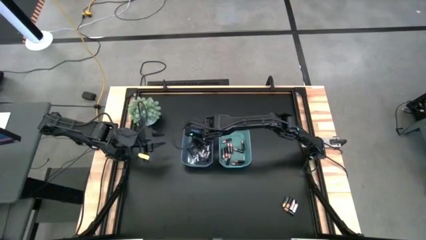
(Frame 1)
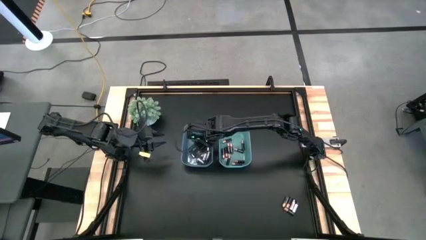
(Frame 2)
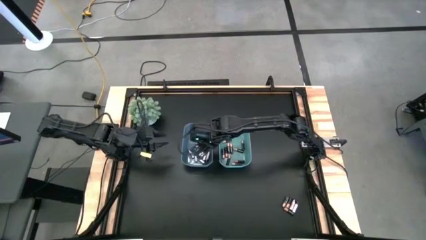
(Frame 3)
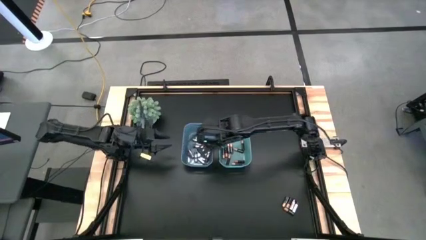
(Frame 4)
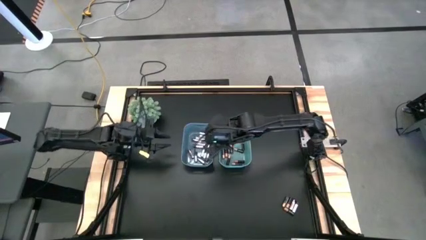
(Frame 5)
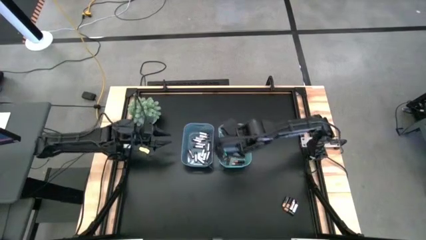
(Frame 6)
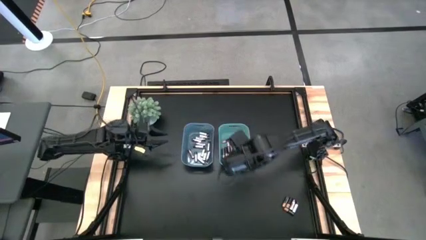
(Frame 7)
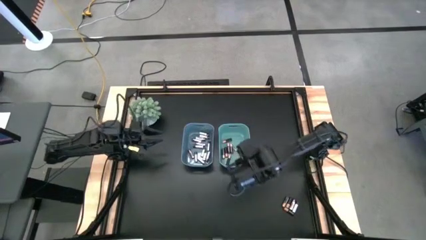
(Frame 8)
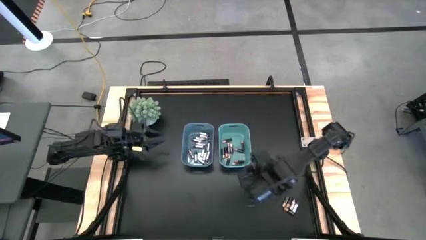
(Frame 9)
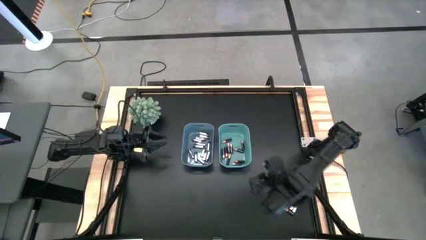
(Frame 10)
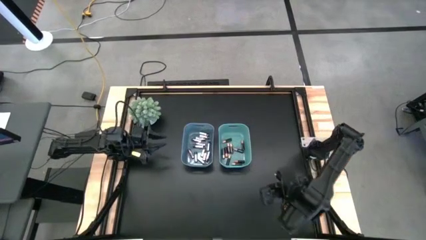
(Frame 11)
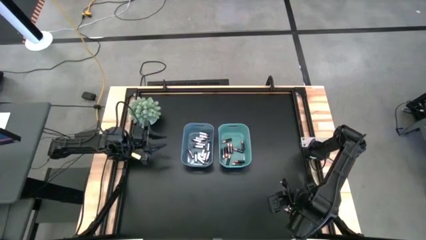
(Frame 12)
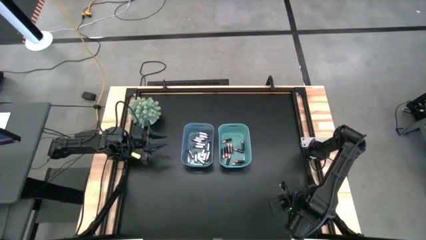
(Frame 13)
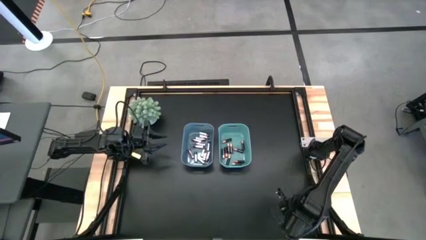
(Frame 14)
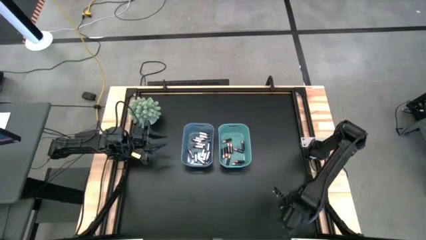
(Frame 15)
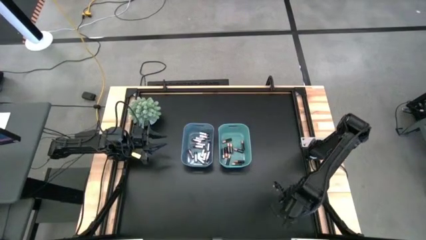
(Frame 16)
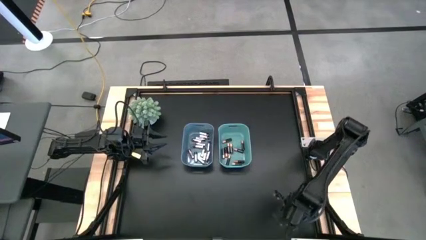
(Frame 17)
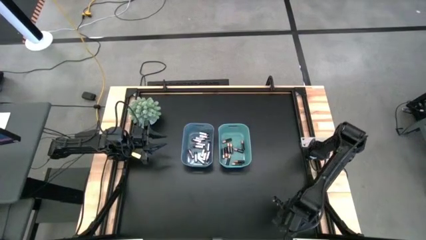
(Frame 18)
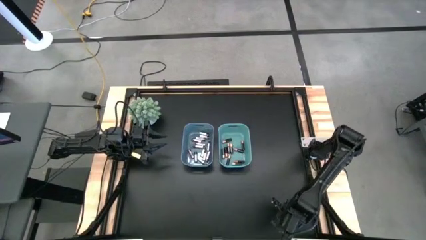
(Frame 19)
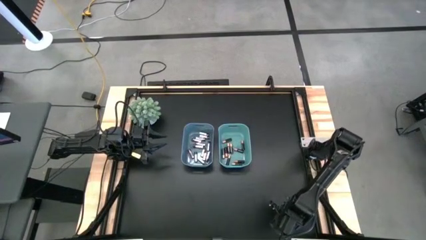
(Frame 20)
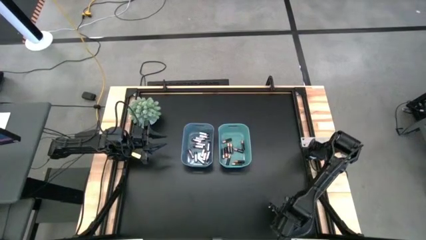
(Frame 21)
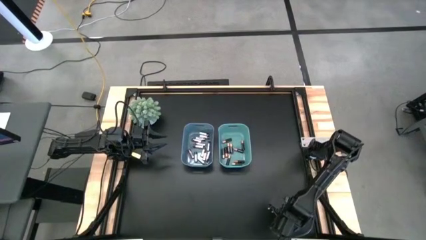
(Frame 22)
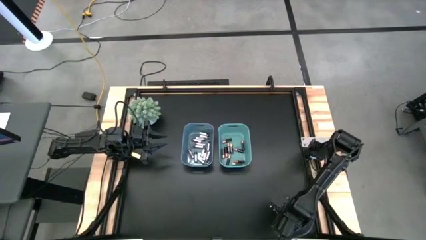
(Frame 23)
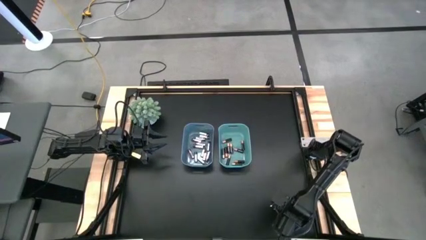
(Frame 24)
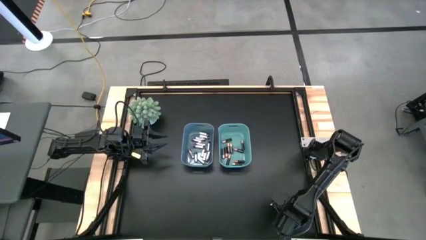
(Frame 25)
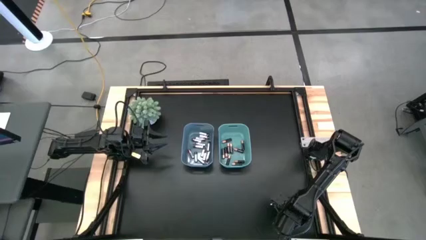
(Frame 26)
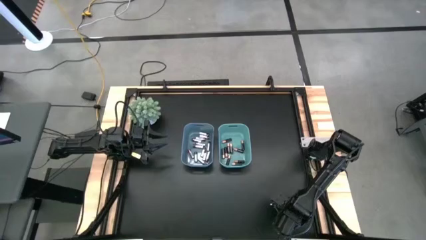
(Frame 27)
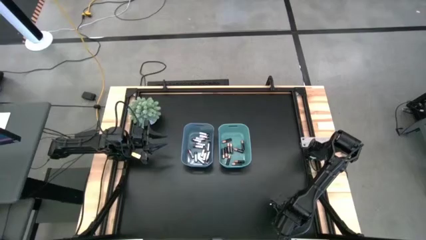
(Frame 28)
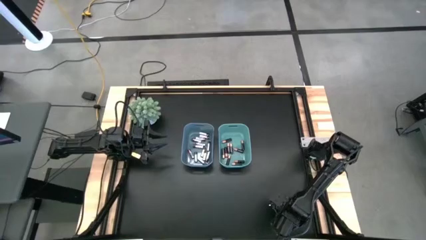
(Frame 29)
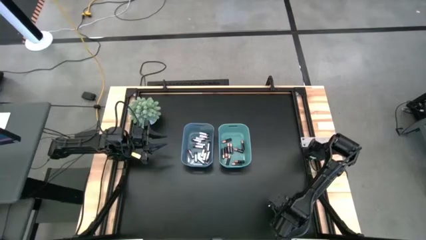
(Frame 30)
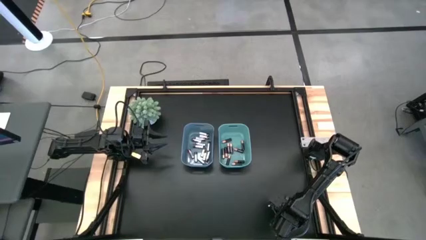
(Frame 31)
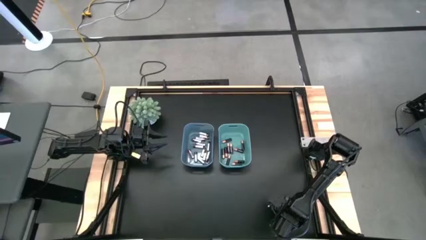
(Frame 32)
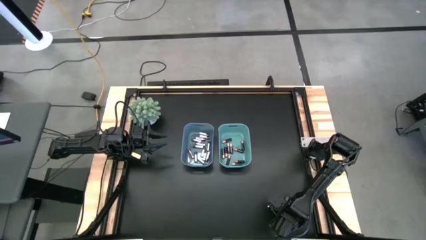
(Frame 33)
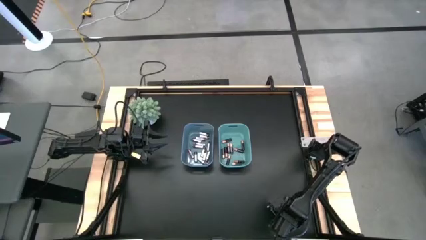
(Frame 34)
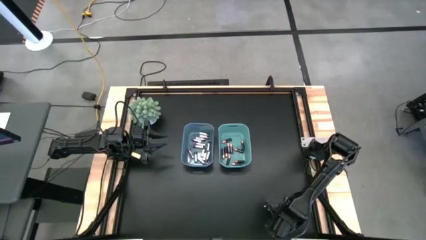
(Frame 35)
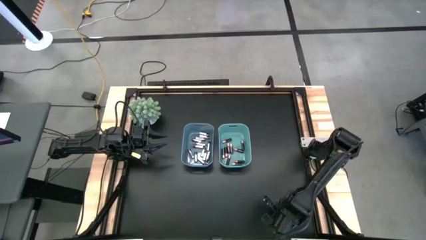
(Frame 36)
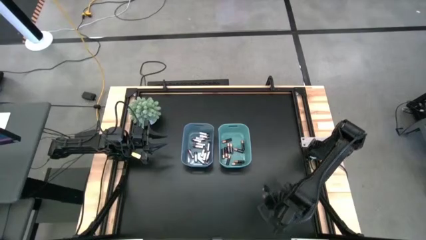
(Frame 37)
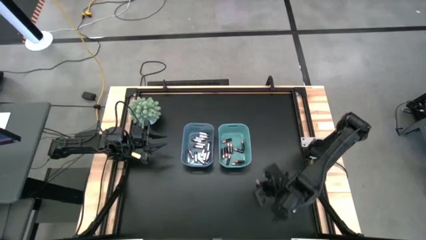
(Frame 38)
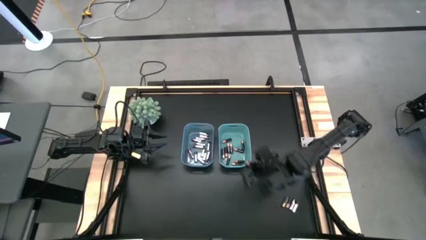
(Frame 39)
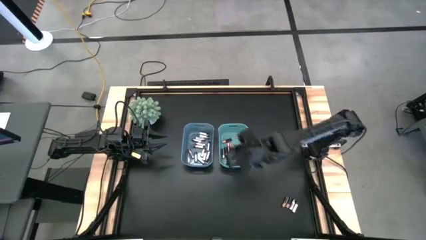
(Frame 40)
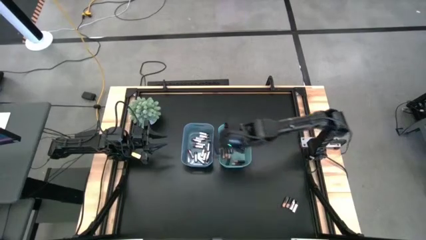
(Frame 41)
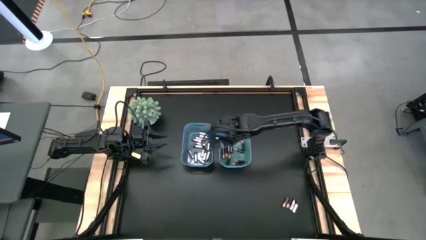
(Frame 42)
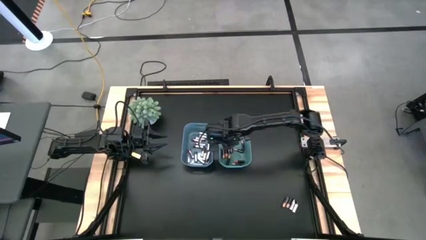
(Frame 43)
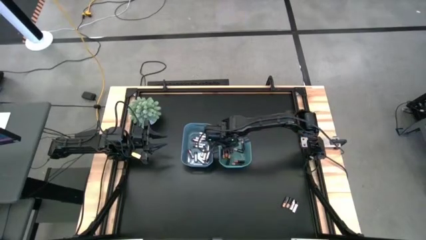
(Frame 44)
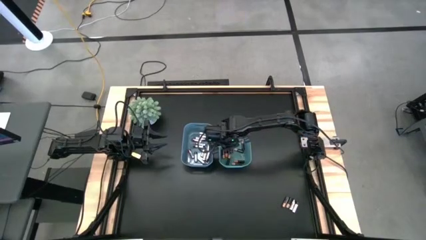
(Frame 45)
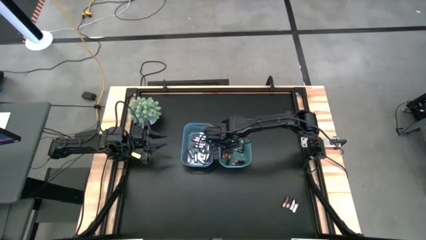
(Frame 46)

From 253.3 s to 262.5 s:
Task: Sort batteries
Put the black battery into the green bin

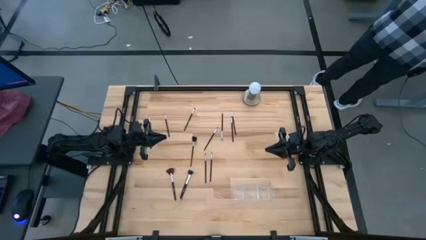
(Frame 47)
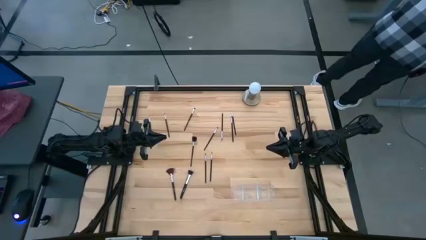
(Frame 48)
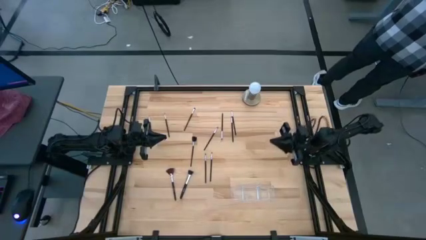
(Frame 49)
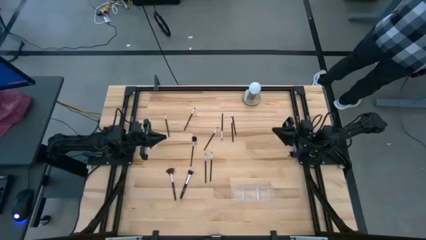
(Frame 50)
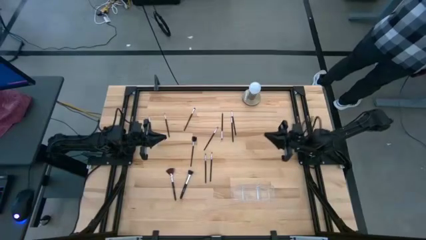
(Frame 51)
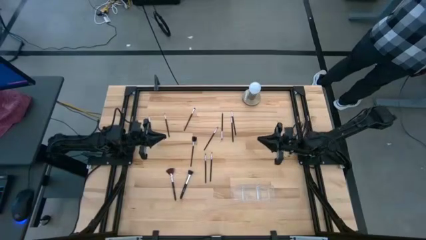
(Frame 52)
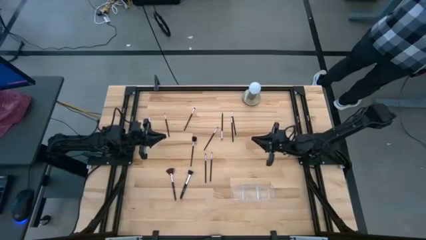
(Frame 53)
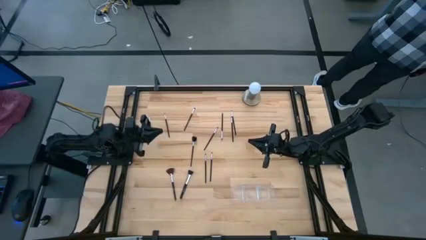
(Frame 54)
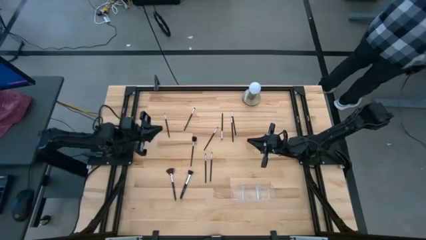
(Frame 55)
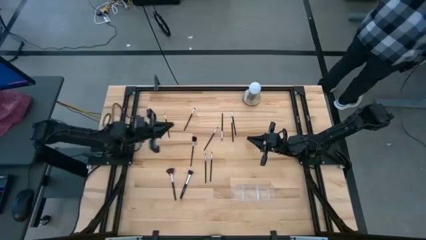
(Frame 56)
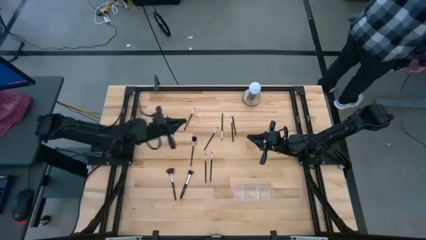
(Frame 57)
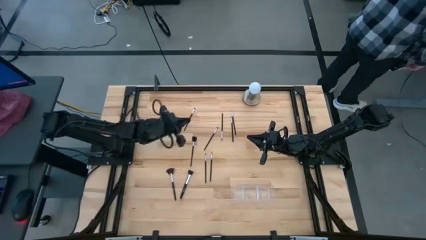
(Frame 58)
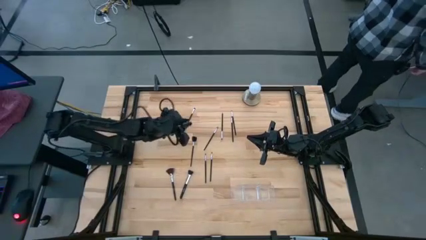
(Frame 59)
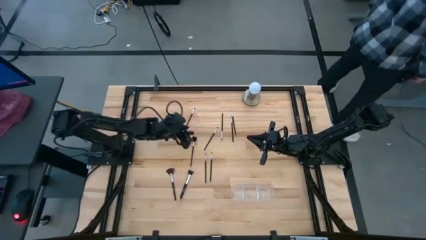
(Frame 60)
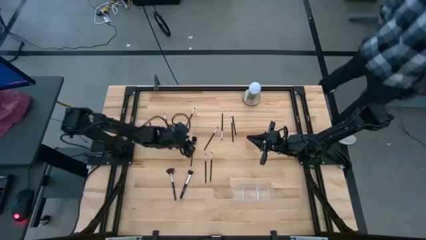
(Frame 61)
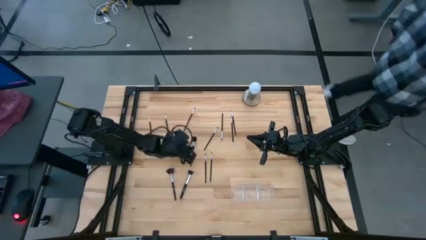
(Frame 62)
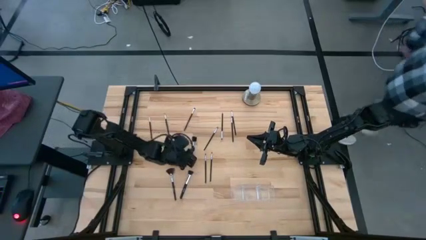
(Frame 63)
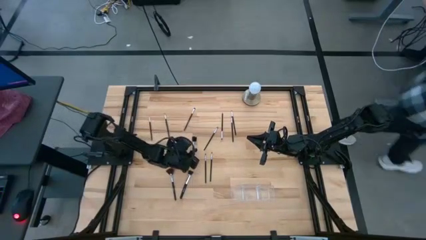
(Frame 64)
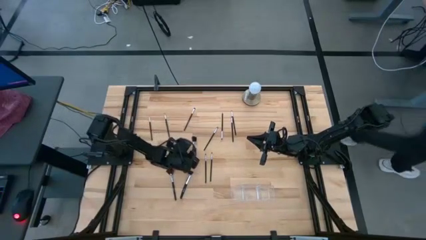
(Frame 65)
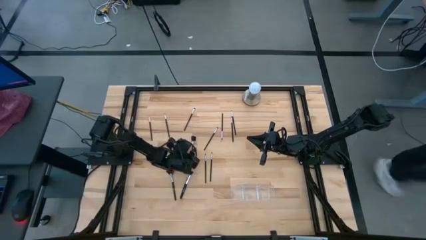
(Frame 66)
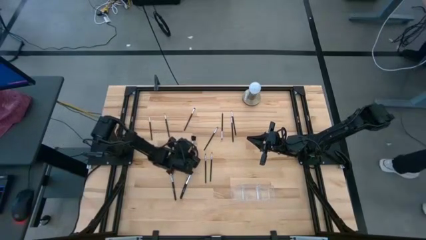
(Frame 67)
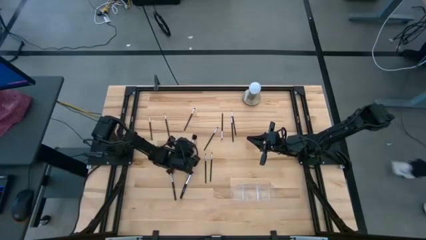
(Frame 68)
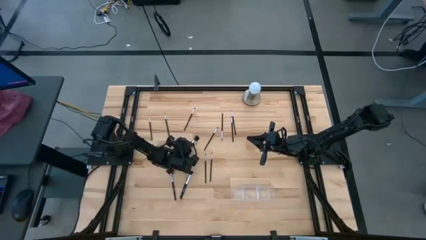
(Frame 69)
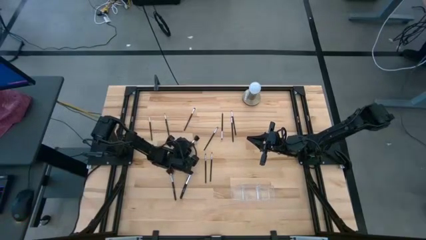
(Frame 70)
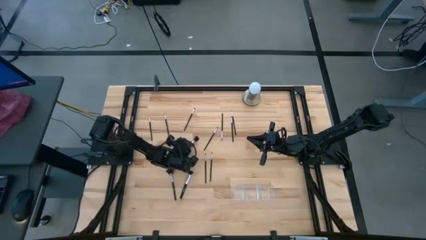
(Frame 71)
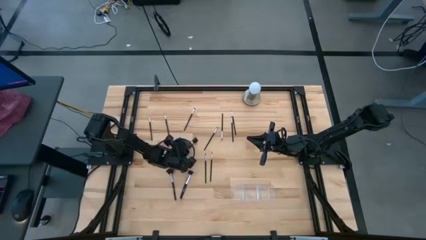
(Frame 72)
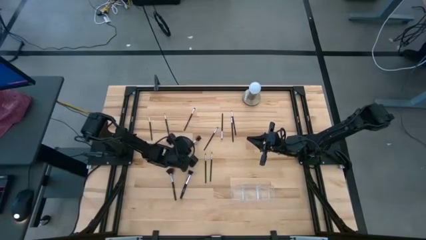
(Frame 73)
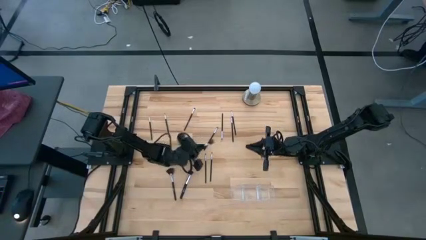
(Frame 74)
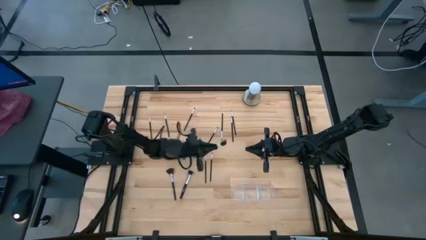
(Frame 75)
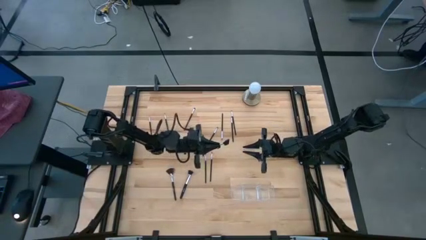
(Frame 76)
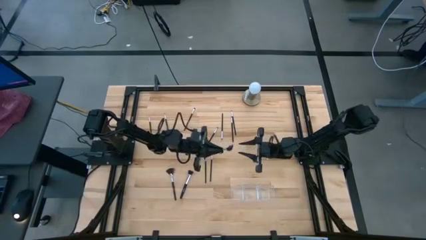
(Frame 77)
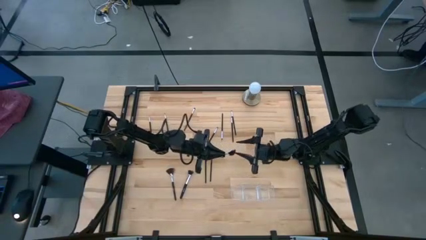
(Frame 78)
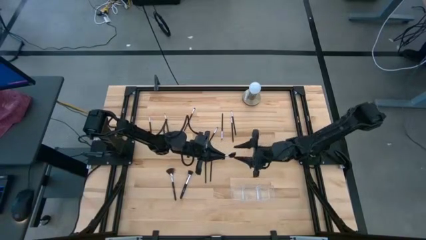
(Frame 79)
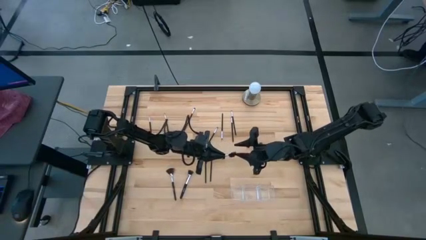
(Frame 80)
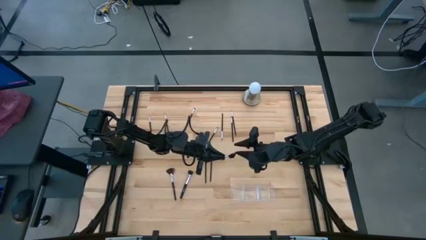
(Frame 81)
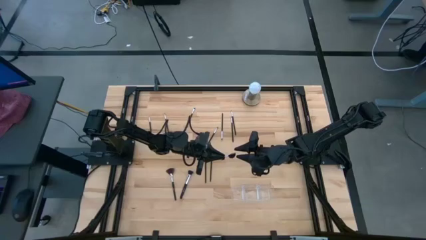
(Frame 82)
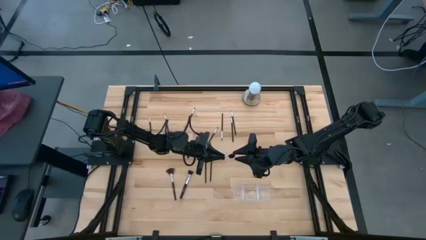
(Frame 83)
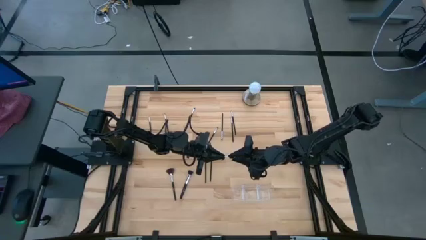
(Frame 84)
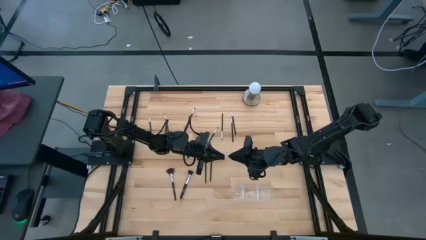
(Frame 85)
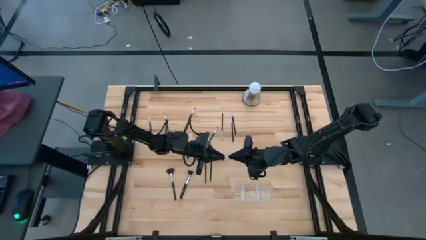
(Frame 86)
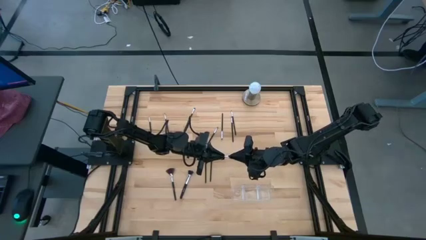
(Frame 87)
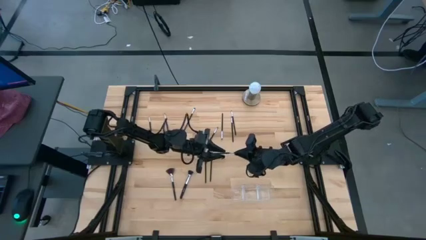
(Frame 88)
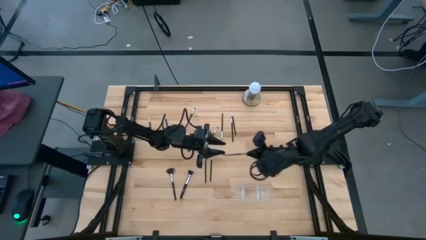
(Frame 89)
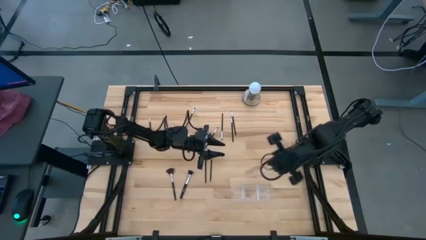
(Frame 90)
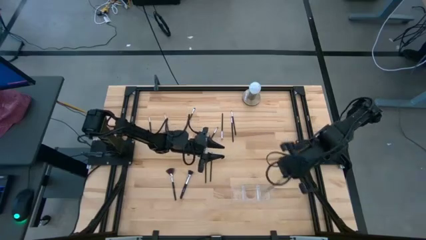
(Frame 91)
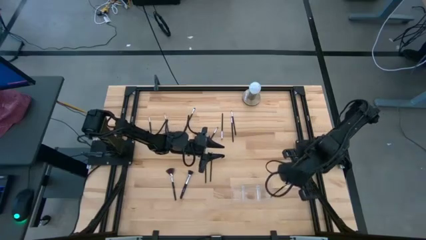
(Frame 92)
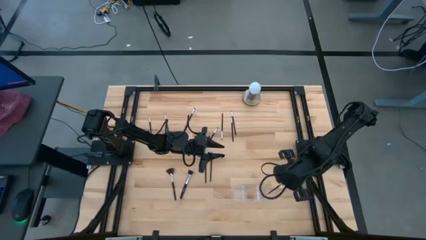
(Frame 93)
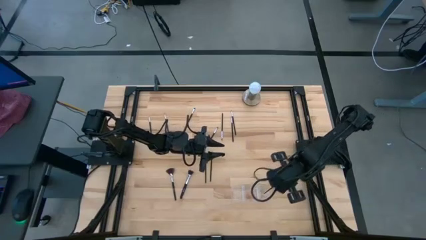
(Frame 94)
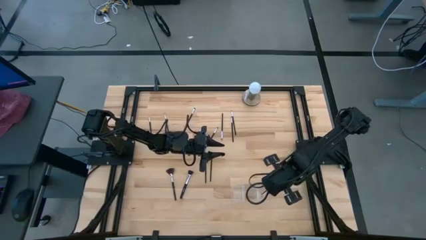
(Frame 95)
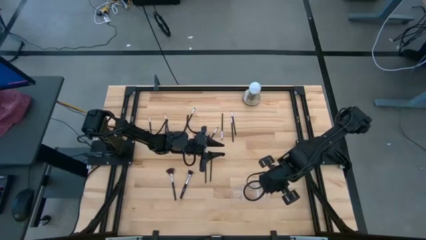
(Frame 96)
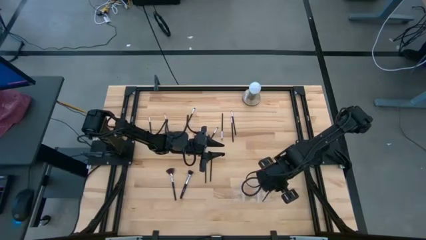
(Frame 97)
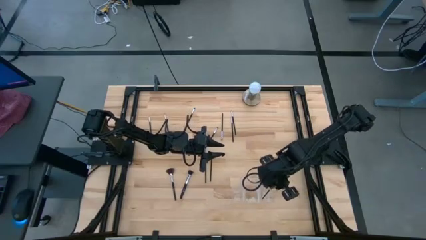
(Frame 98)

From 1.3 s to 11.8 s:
Task: Put items in baskets/containers
Put the lash brush into the right section of the transparent organizer
